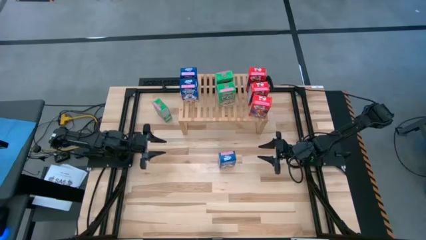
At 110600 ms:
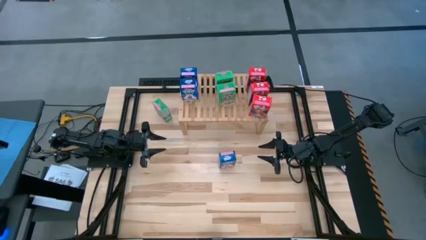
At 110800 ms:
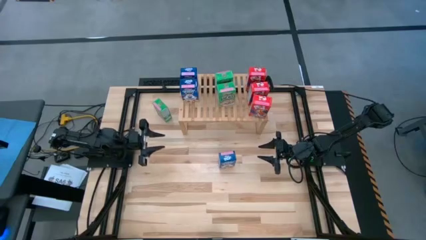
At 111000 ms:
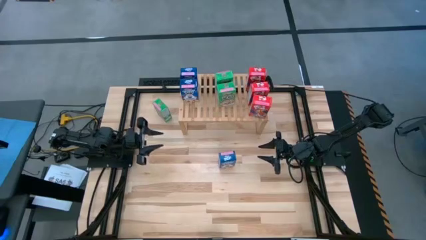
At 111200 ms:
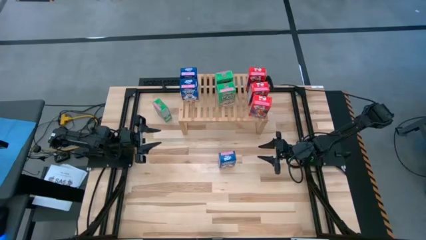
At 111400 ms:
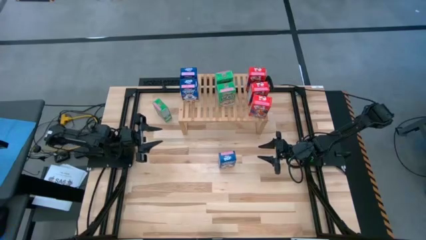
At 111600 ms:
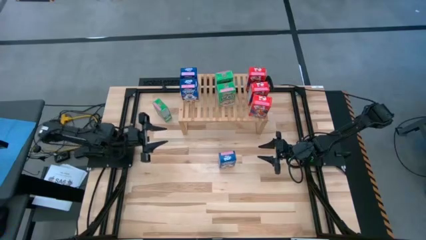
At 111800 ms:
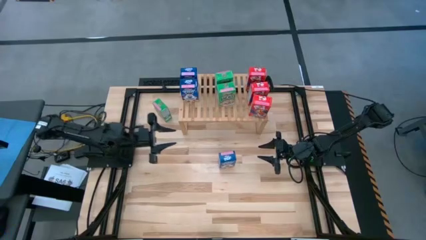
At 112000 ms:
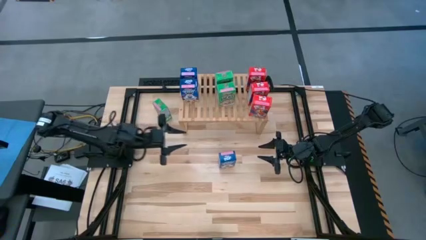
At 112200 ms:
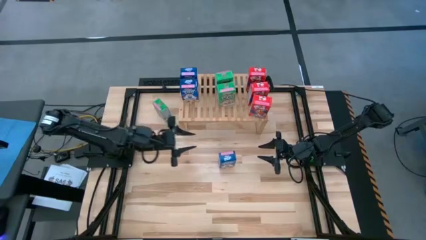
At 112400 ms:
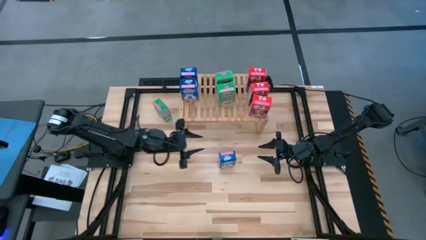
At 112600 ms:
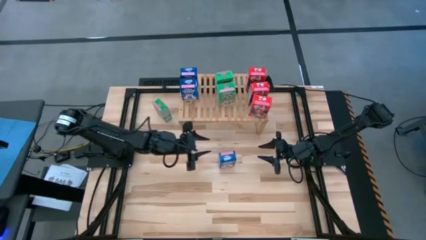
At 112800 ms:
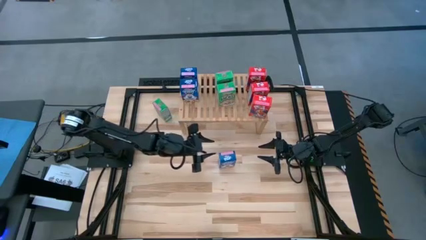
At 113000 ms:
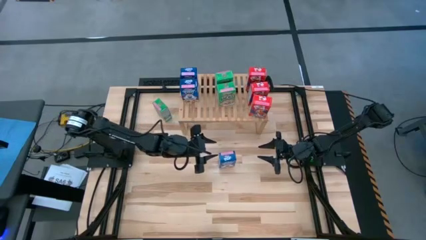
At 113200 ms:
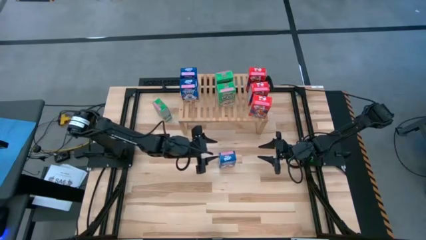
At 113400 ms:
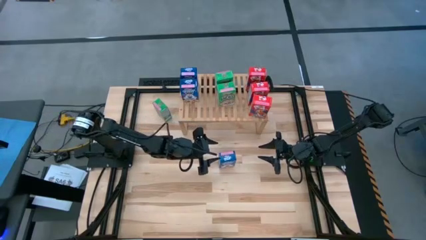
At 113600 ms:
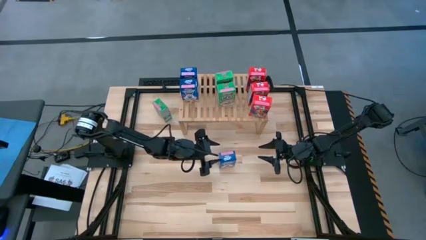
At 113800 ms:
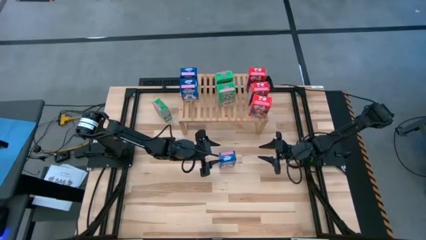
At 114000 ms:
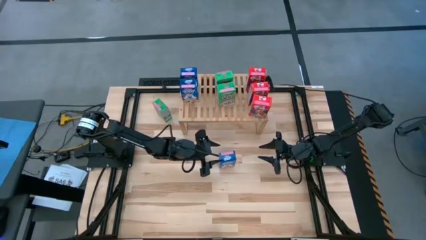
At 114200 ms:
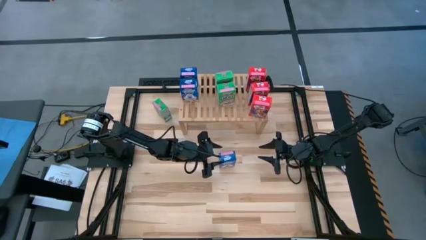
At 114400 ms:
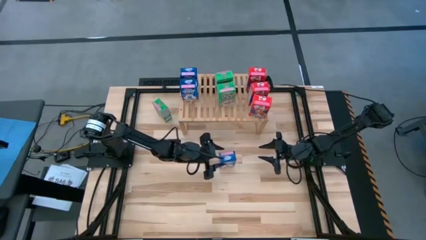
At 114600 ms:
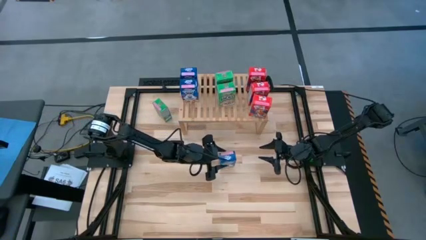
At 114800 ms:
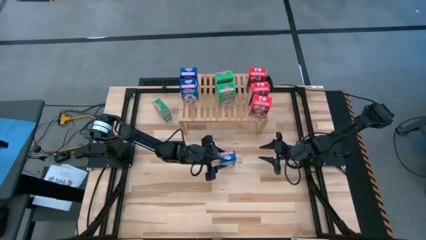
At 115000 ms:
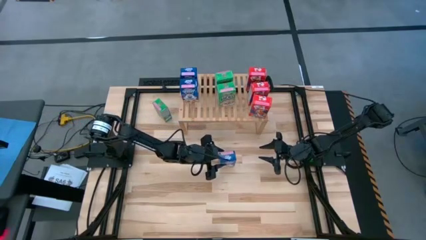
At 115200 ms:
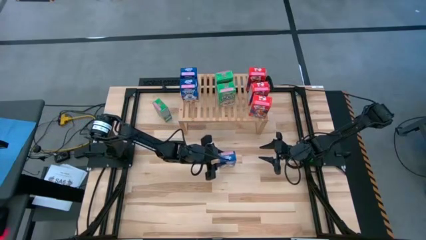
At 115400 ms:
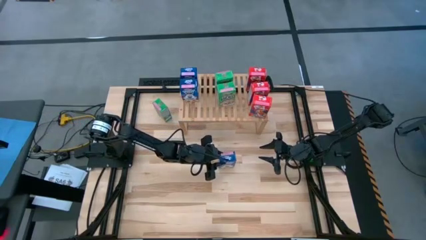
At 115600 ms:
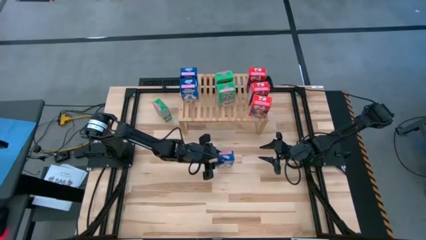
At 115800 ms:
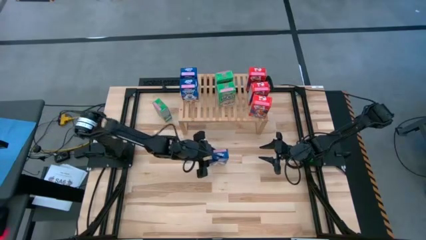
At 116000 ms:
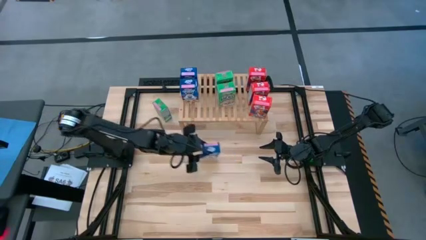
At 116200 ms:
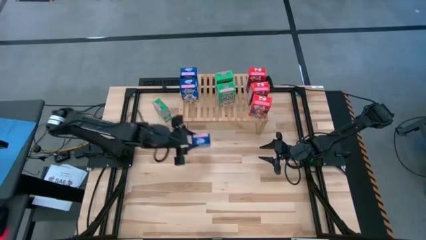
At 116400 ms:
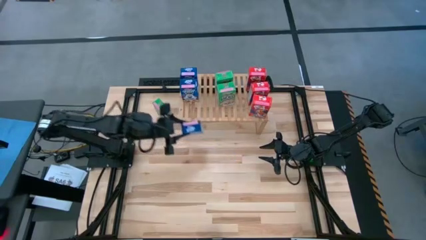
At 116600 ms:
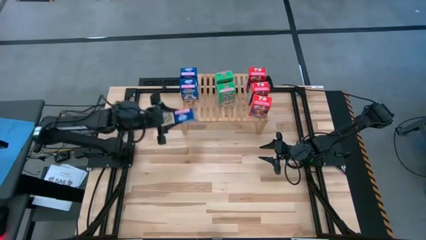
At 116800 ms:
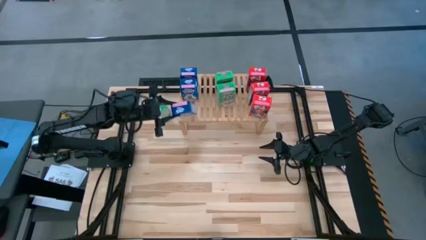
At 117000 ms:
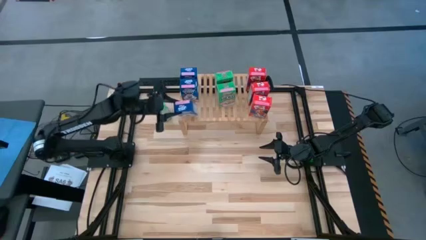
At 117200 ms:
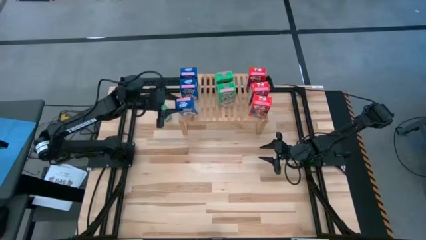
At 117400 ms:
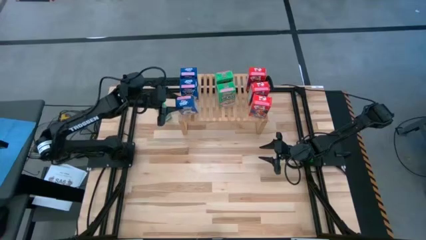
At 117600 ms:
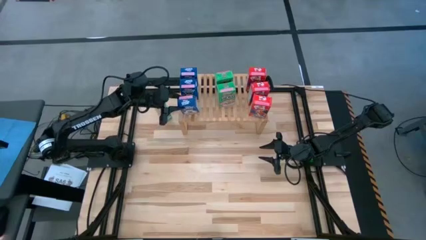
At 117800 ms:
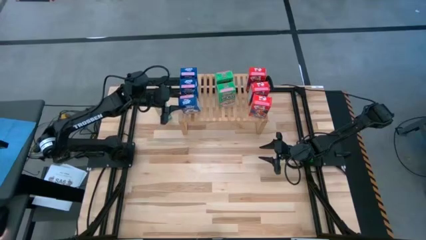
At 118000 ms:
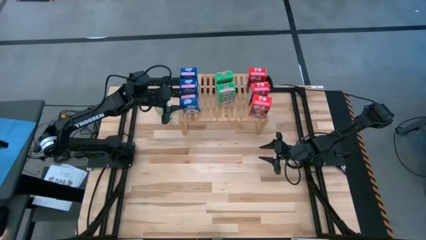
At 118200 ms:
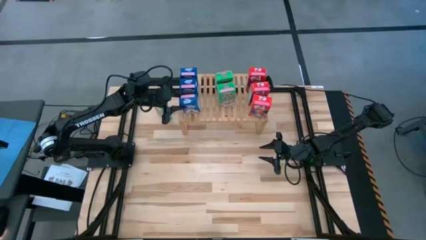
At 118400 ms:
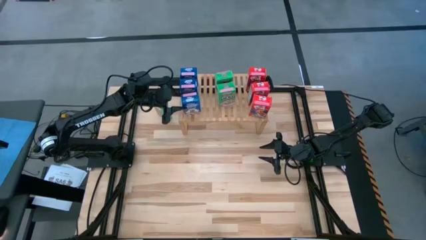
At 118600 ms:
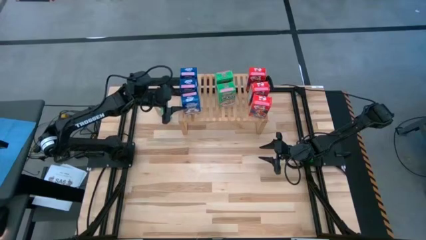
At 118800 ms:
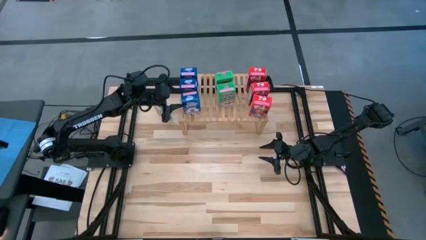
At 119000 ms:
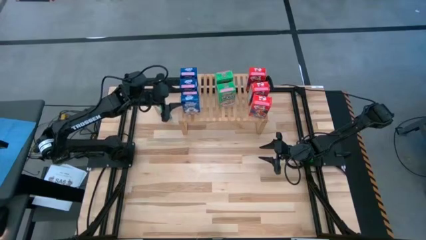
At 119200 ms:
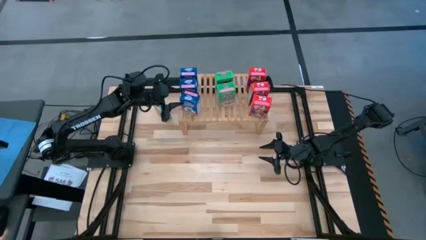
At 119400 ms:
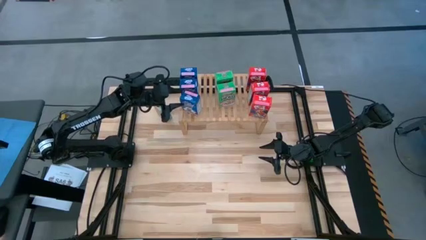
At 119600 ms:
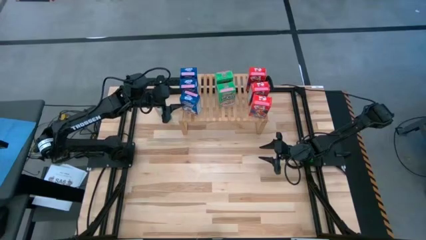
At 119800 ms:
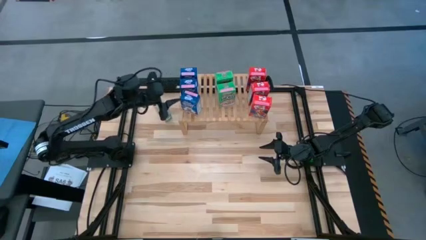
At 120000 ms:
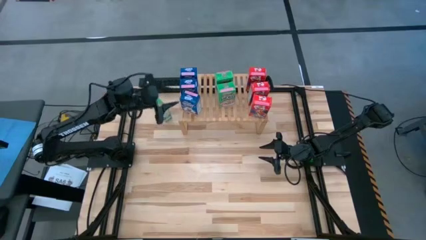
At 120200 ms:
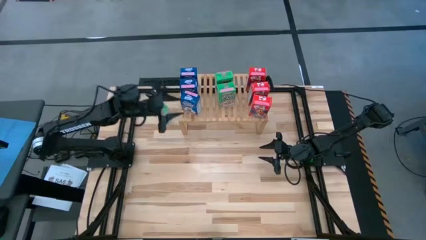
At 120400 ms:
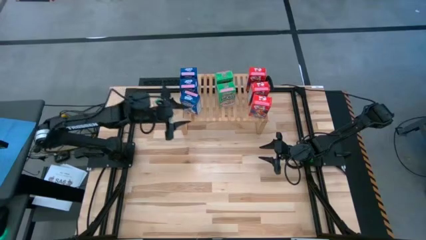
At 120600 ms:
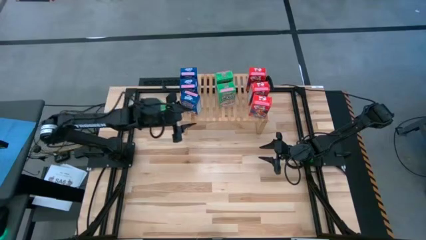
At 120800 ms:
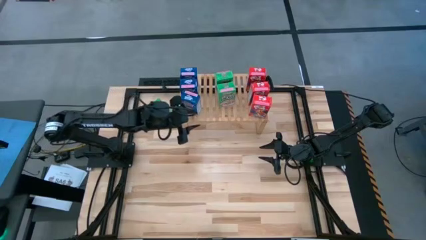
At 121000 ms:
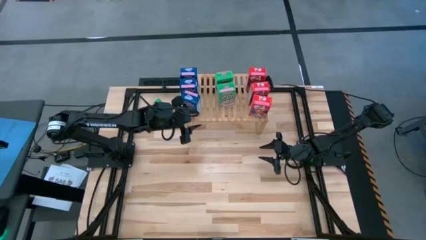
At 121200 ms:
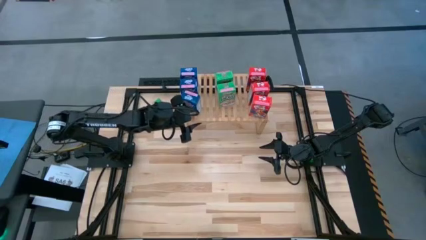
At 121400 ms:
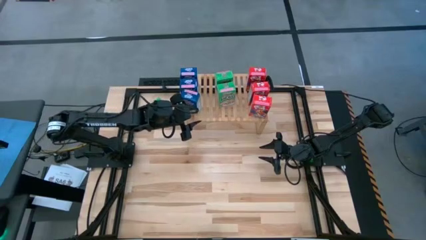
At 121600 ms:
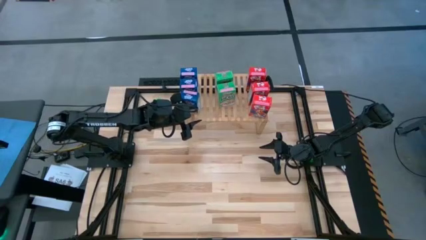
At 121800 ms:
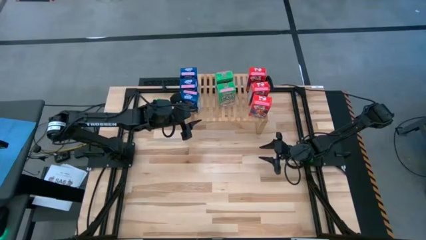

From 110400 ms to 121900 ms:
Task: Stack cereal on shelf
Put the blue cereal box on the shelf aligned with the other blue cereal box
